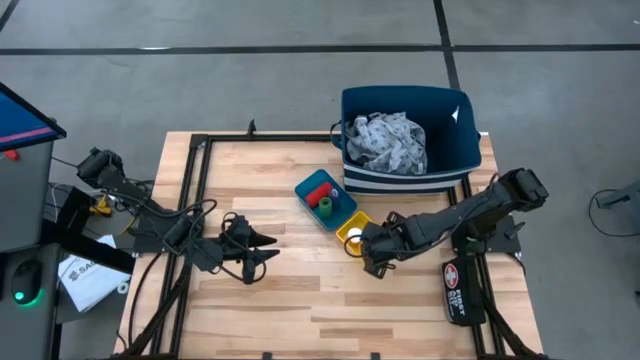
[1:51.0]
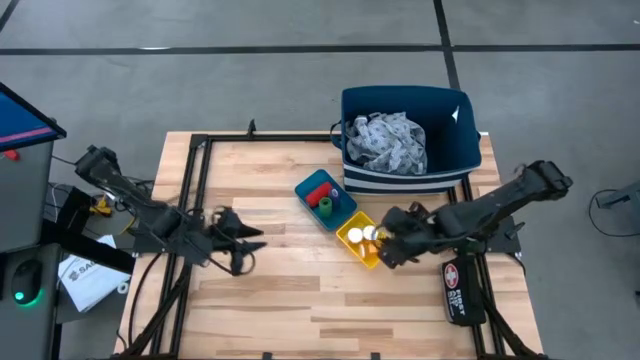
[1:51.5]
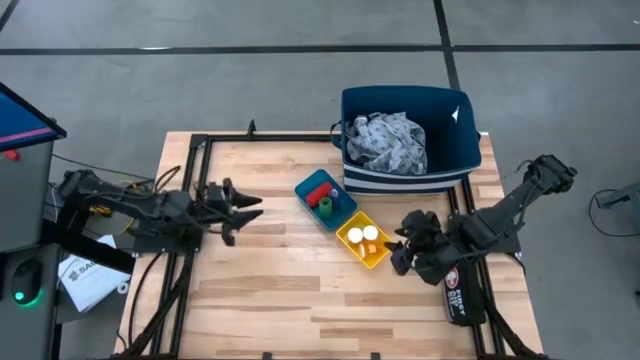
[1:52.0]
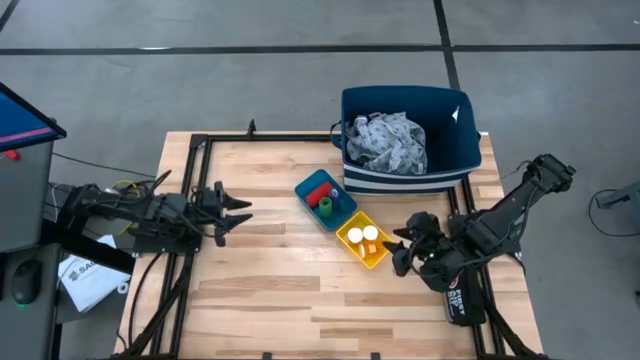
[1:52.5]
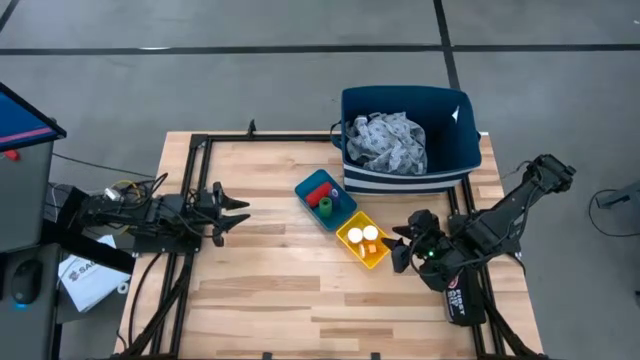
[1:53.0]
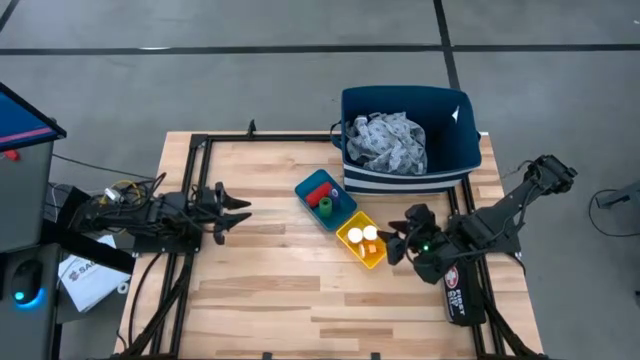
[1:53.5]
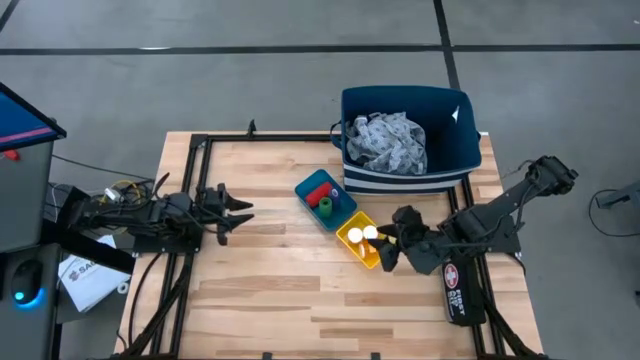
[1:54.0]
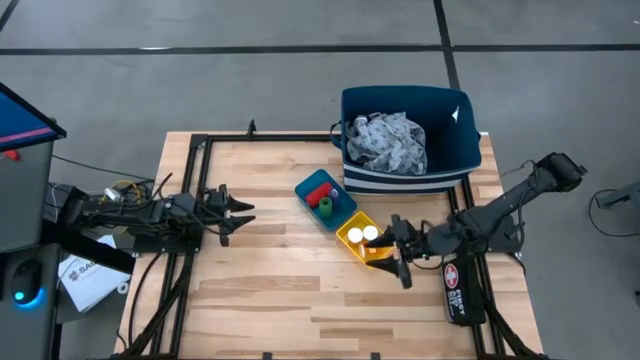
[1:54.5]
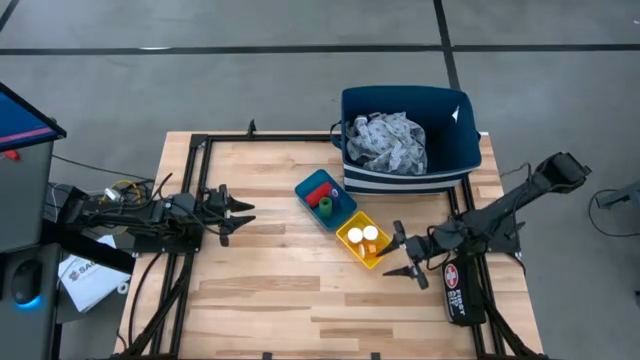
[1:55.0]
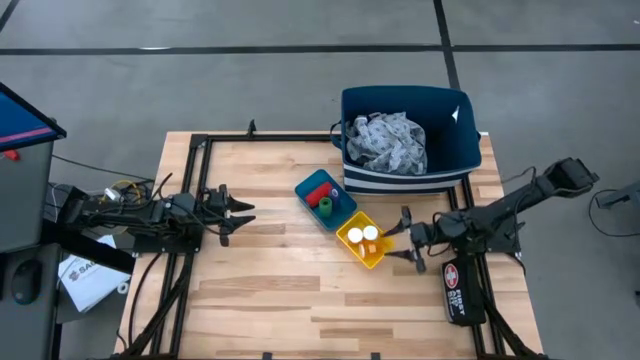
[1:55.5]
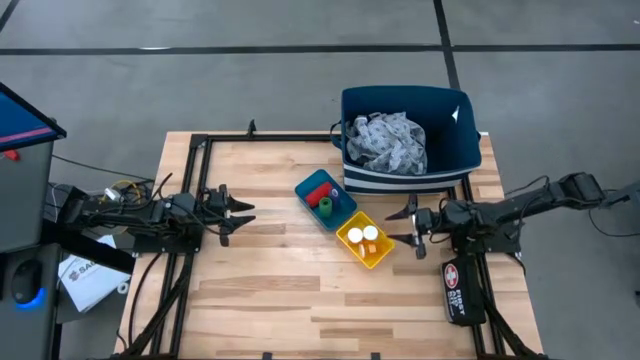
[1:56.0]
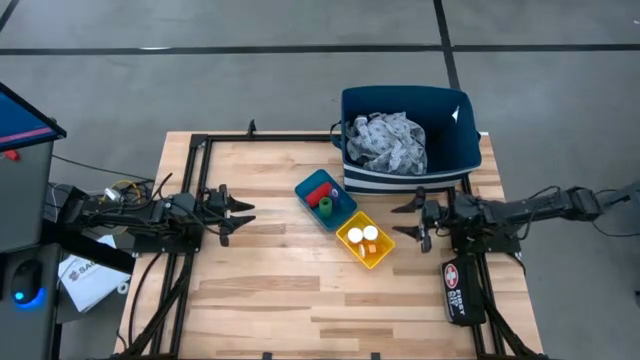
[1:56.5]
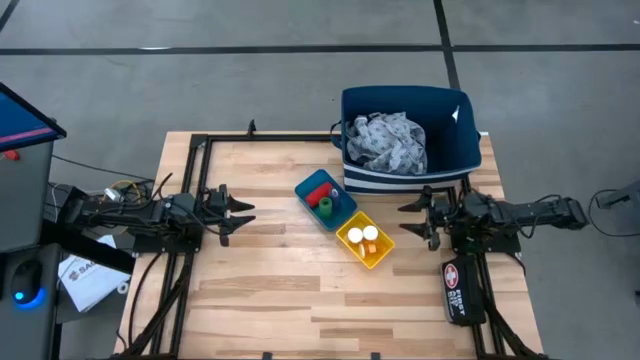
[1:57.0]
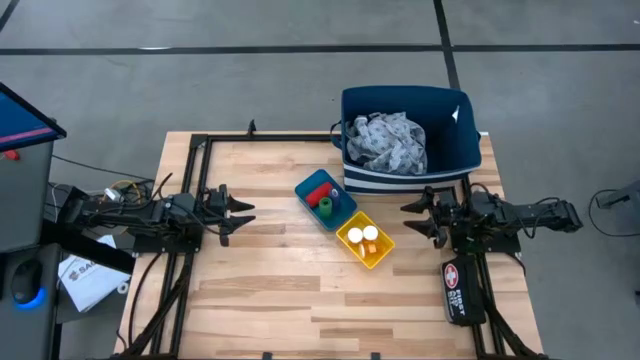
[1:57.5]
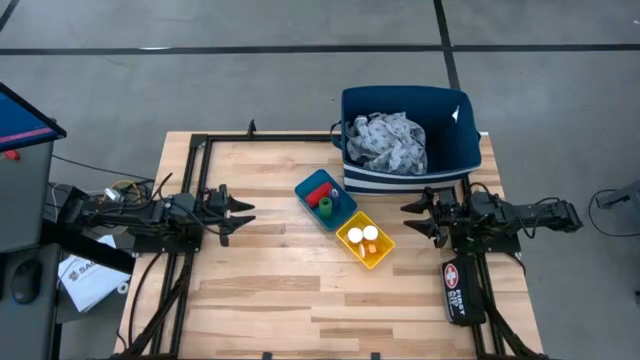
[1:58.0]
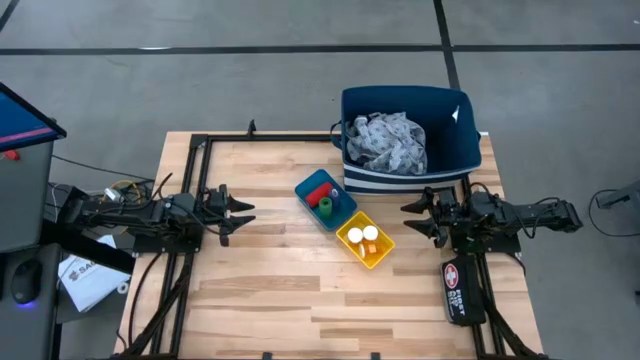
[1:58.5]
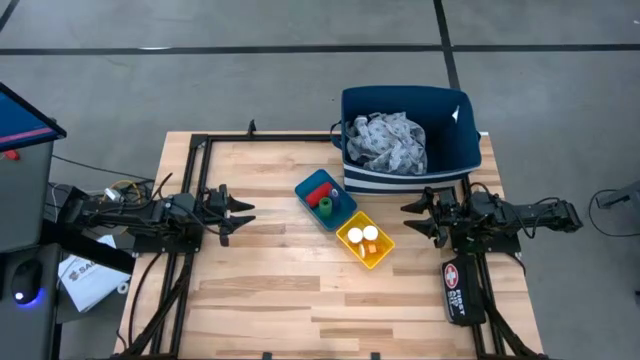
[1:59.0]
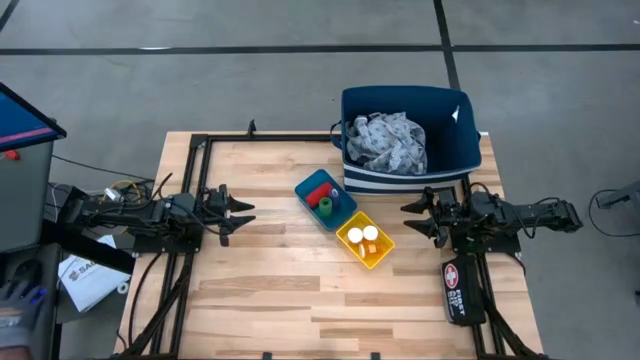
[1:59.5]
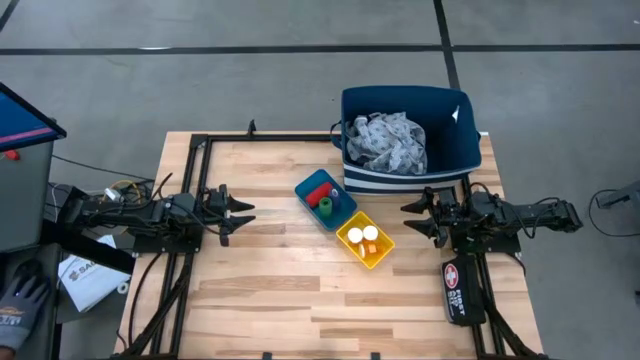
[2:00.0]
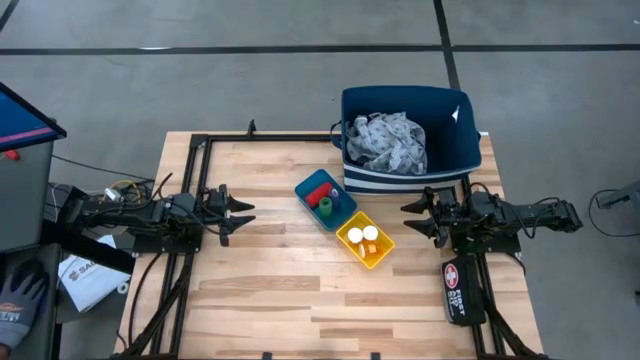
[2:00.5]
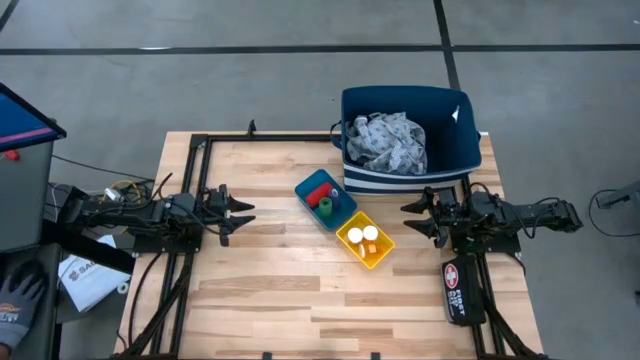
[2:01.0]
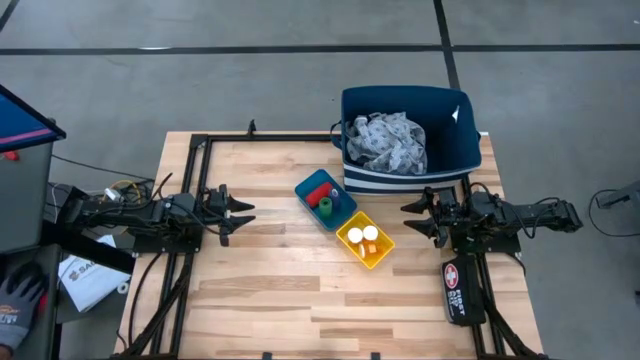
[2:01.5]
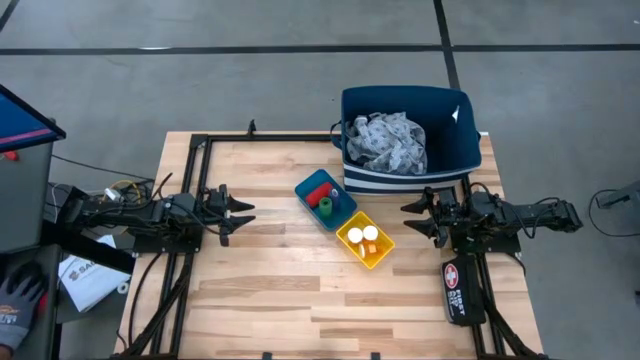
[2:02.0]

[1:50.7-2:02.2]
Task: Pick & Place Medicine items
Return to Home Position

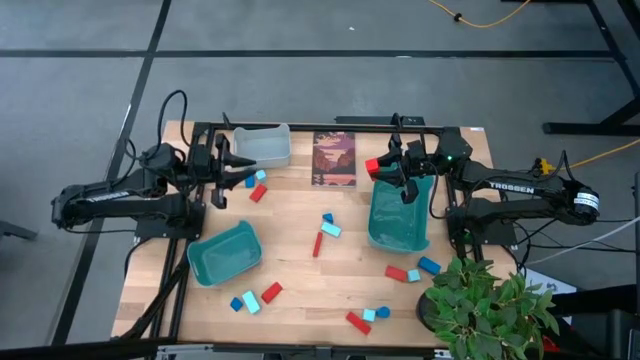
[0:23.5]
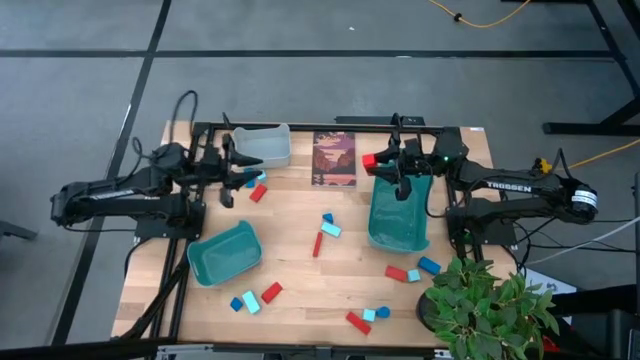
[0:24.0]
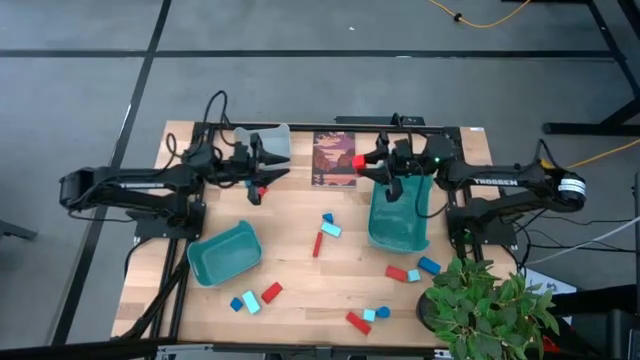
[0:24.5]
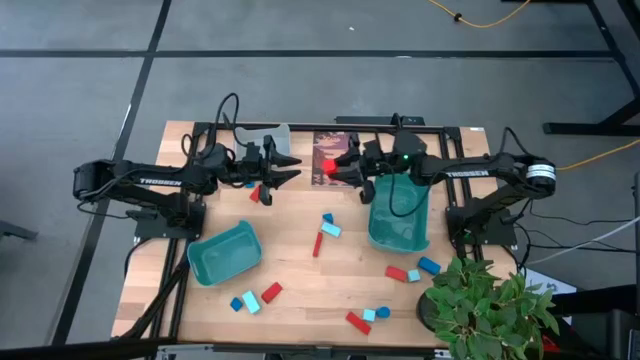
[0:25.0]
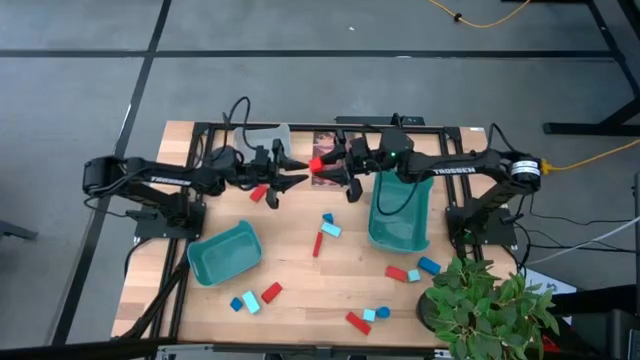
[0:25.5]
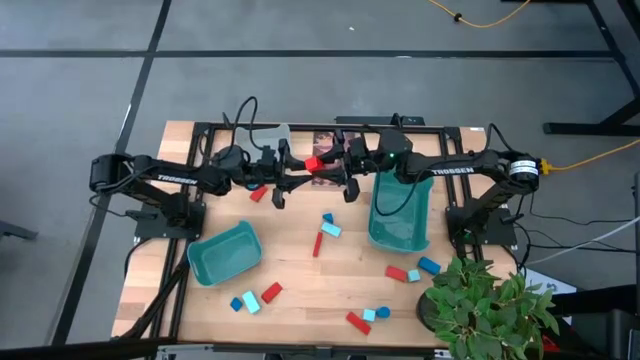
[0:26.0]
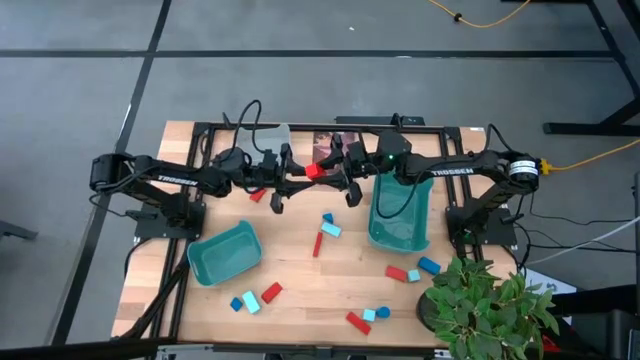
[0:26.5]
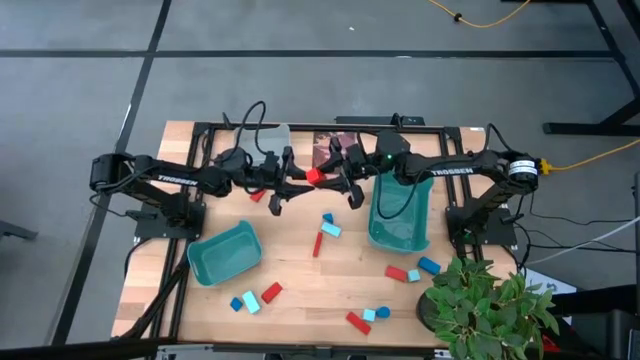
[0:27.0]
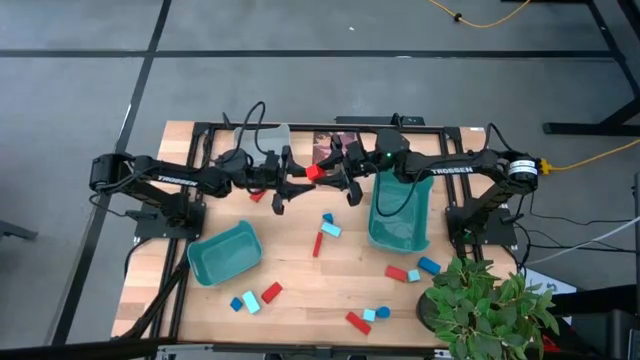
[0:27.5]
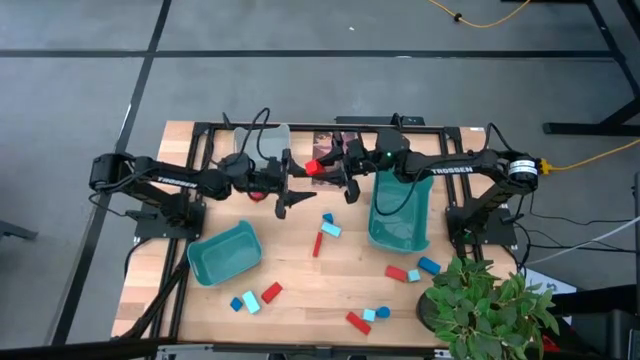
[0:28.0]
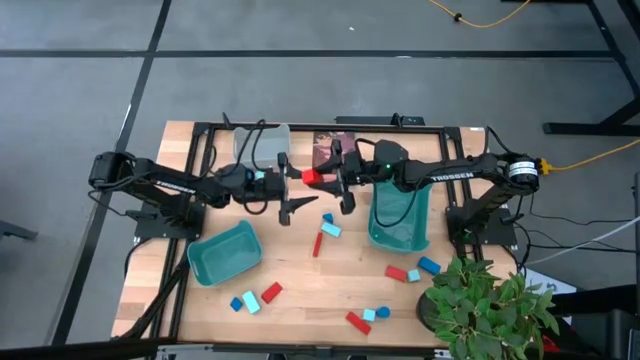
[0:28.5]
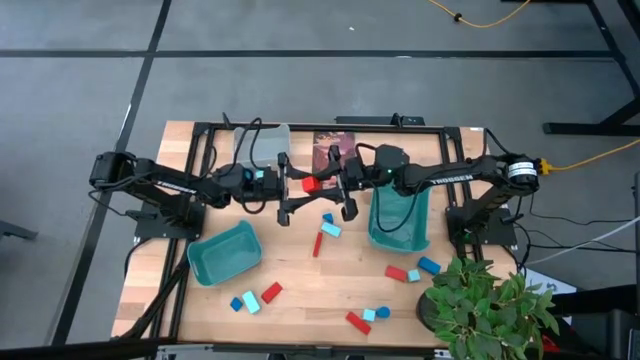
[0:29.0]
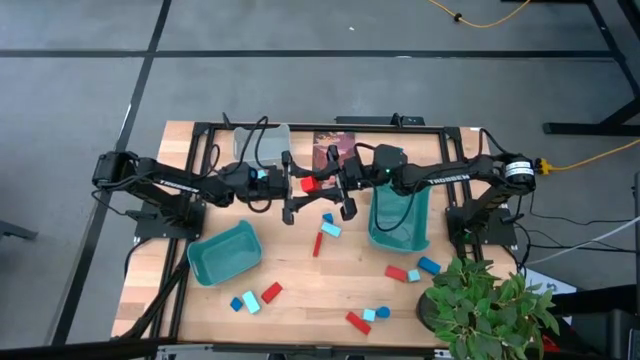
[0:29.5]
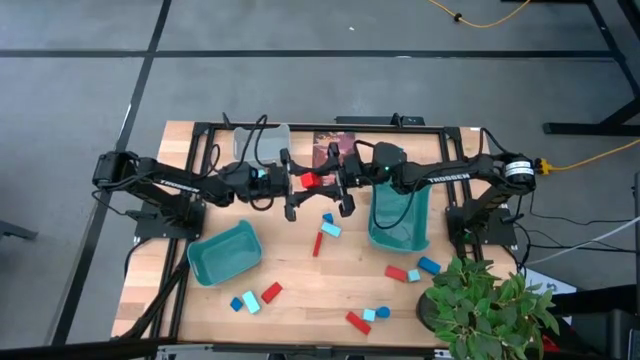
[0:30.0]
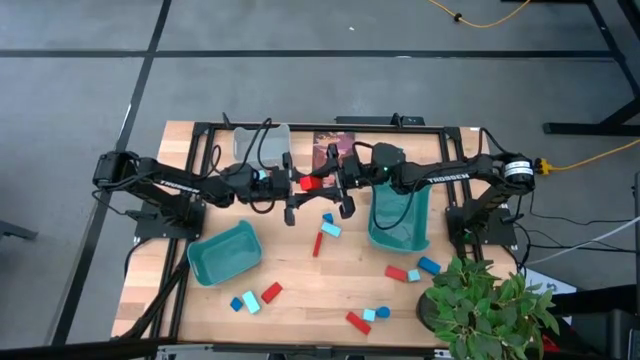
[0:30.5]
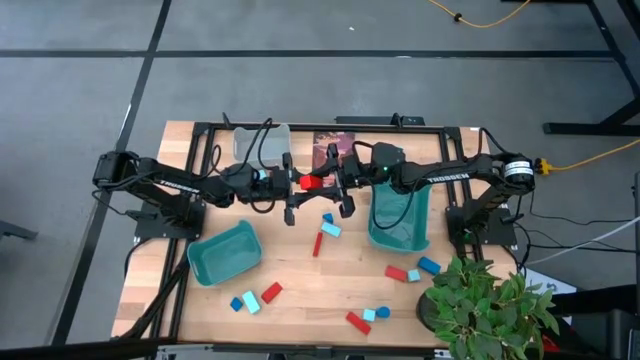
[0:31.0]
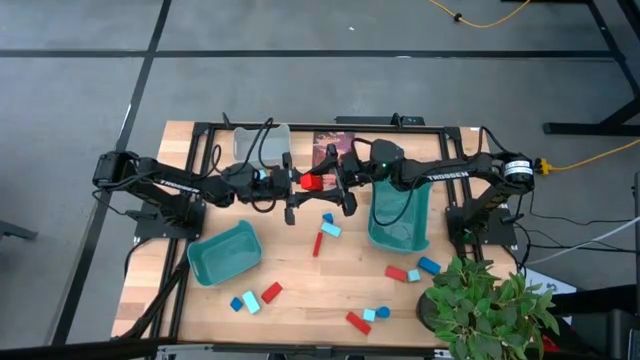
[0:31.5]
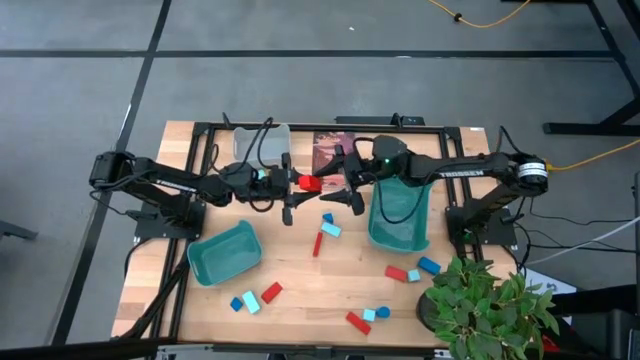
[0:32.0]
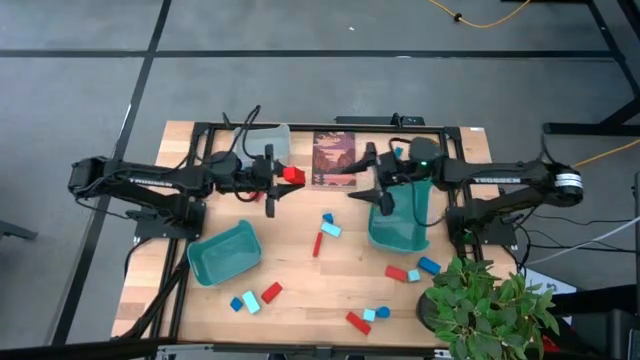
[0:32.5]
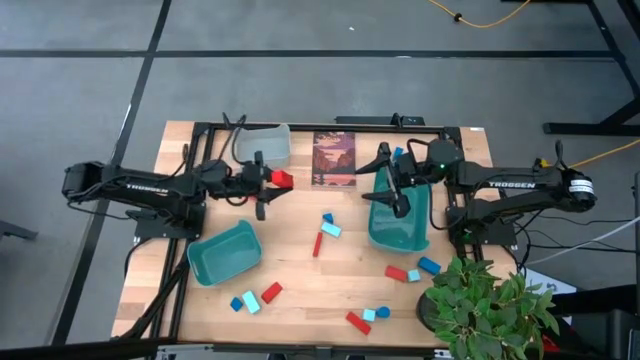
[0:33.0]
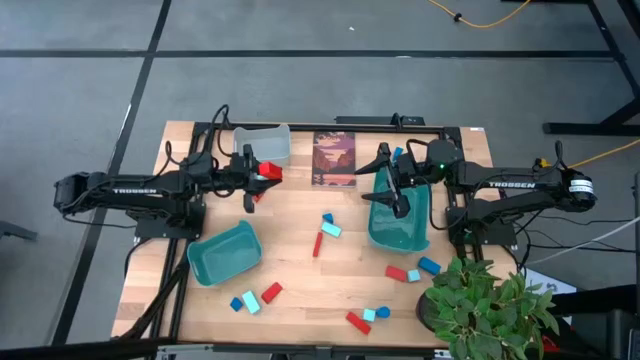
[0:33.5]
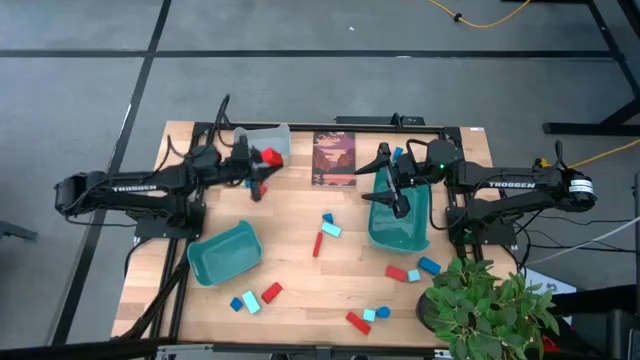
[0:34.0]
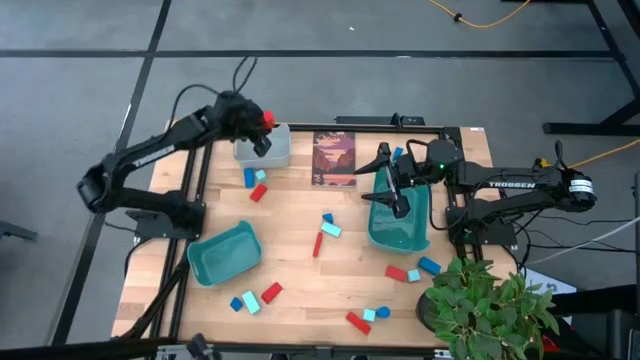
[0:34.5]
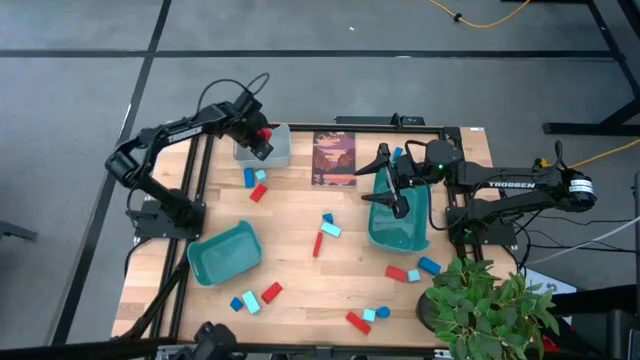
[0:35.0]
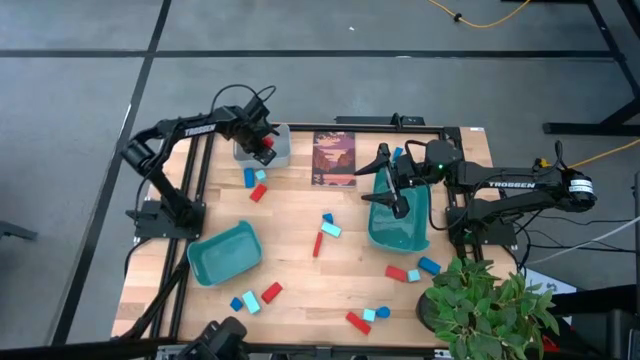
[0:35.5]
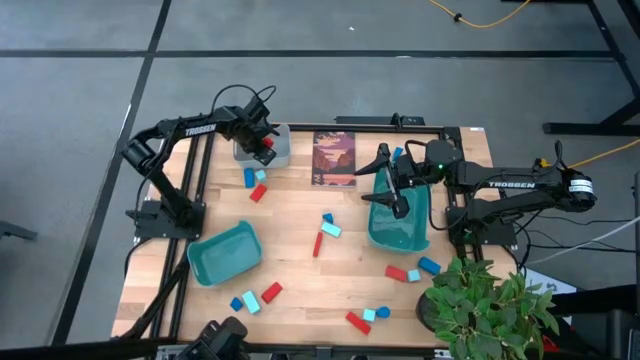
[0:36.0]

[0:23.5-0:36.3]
Task: Sort & place blocks by color
Put the red block into the gray bin
